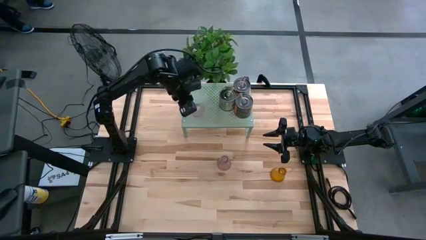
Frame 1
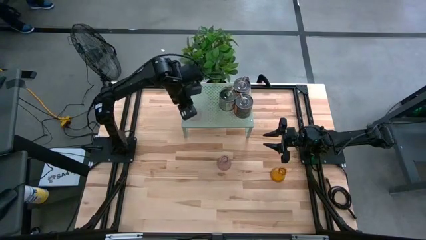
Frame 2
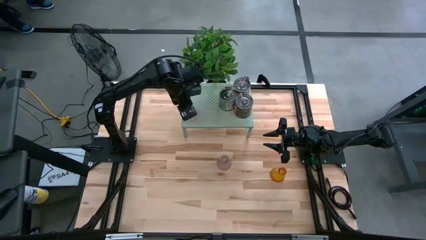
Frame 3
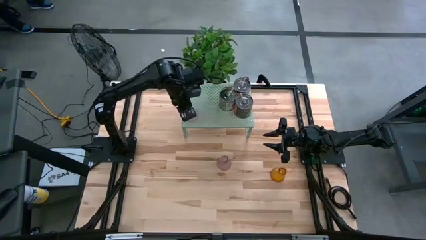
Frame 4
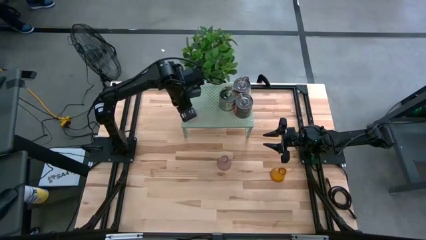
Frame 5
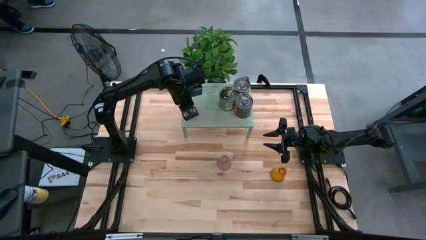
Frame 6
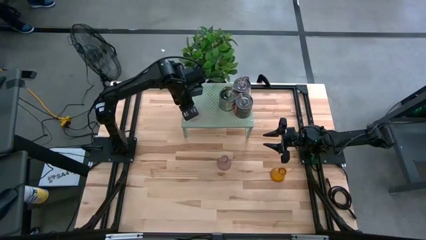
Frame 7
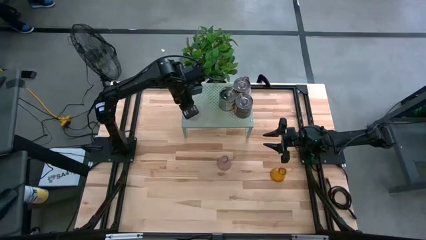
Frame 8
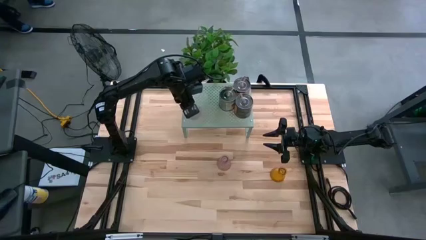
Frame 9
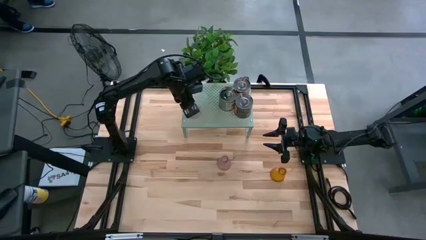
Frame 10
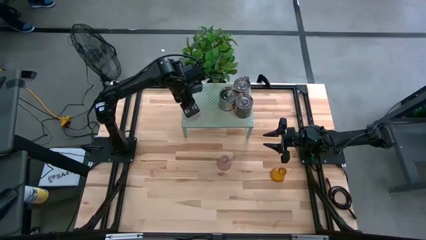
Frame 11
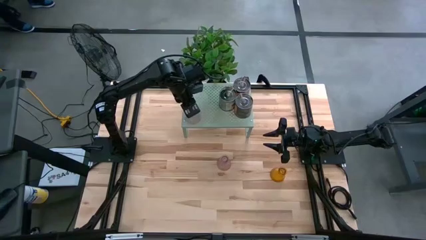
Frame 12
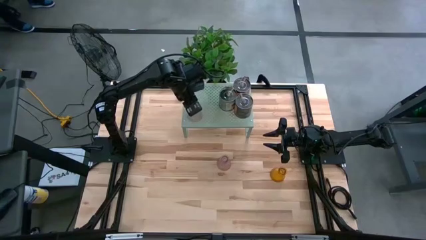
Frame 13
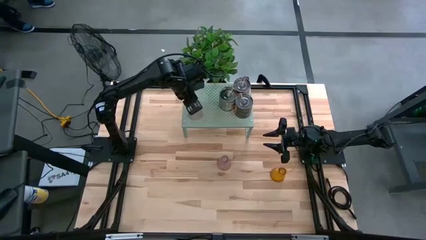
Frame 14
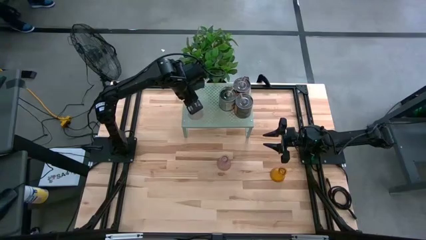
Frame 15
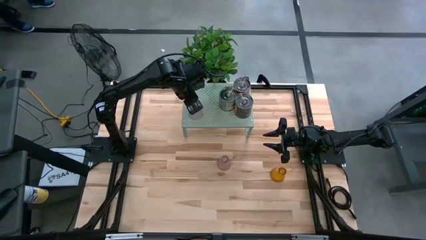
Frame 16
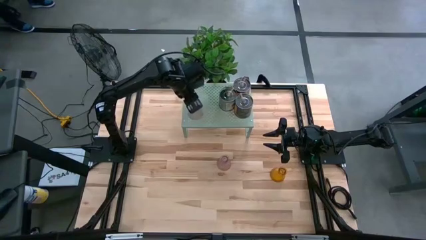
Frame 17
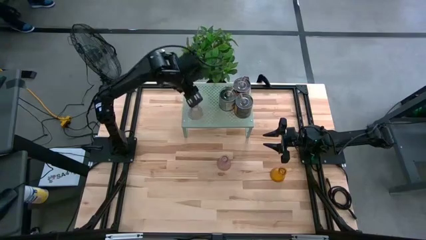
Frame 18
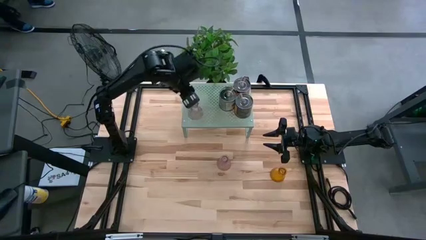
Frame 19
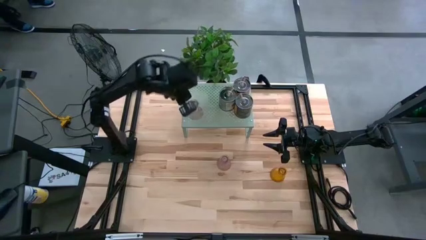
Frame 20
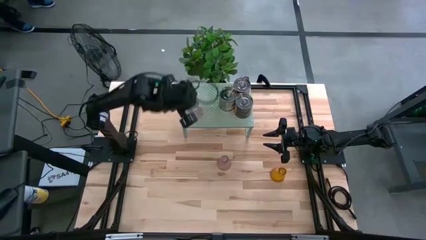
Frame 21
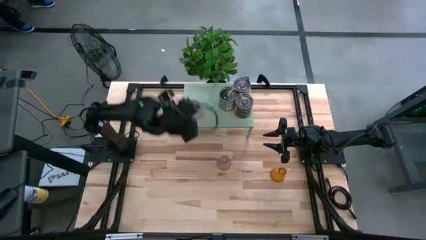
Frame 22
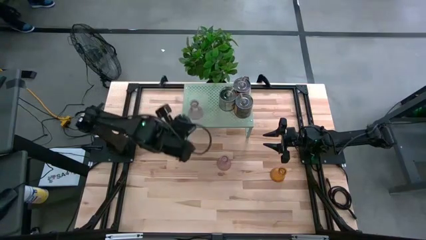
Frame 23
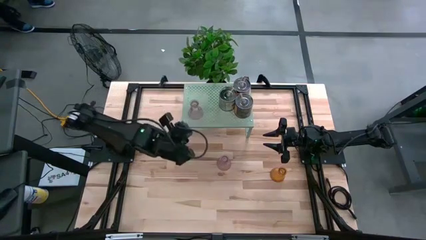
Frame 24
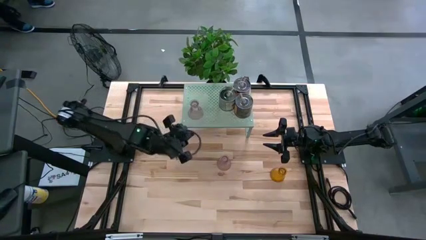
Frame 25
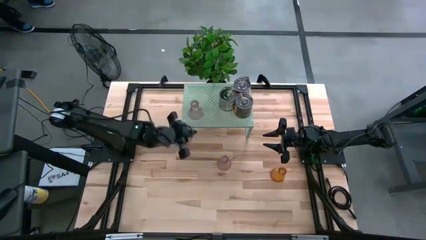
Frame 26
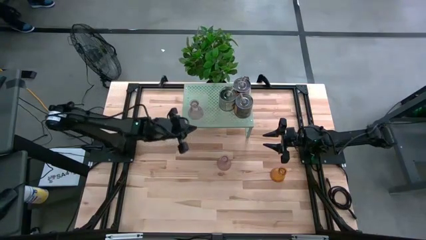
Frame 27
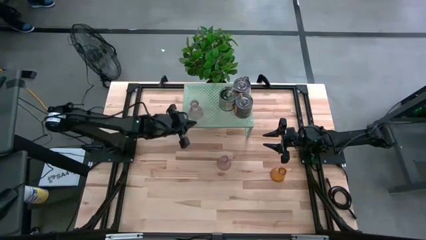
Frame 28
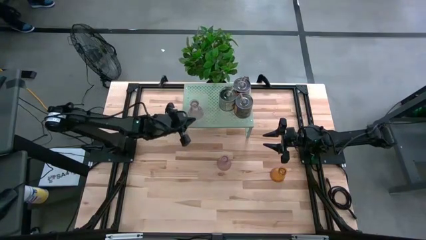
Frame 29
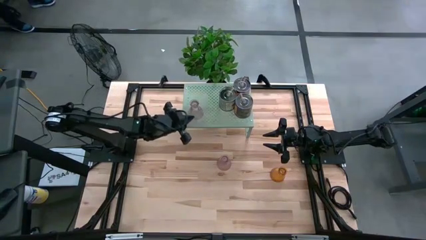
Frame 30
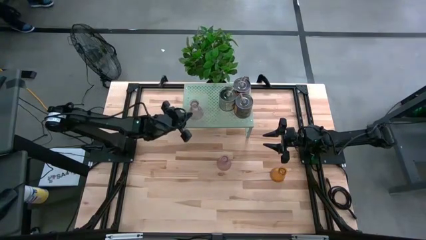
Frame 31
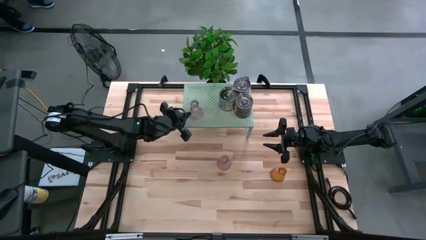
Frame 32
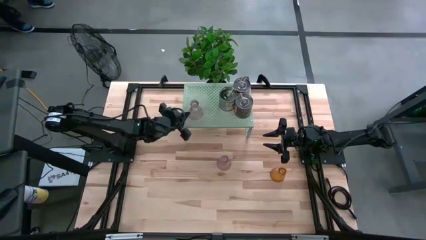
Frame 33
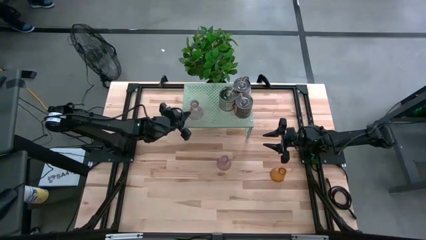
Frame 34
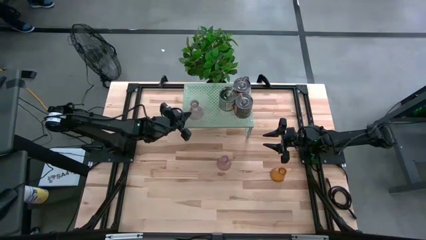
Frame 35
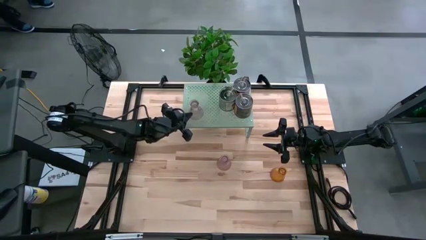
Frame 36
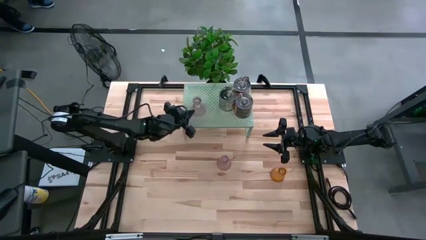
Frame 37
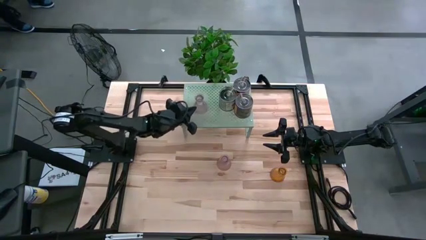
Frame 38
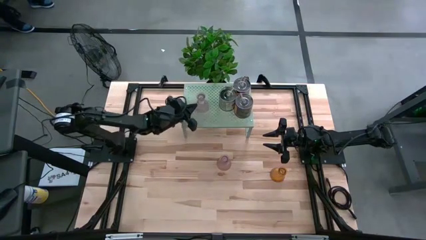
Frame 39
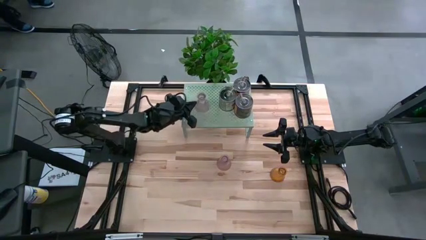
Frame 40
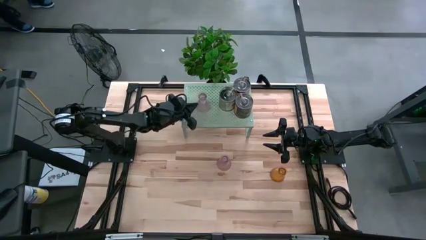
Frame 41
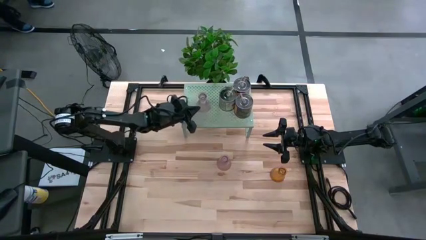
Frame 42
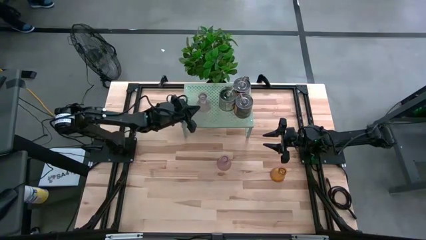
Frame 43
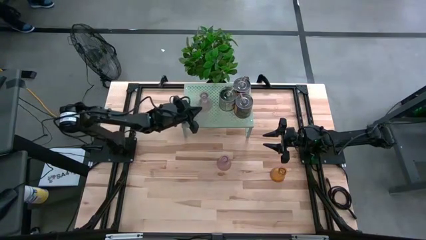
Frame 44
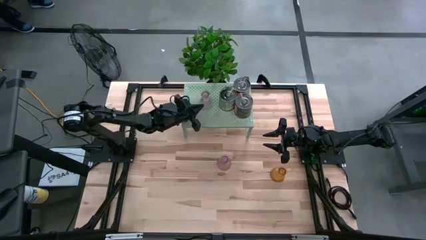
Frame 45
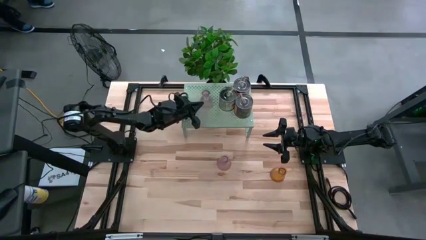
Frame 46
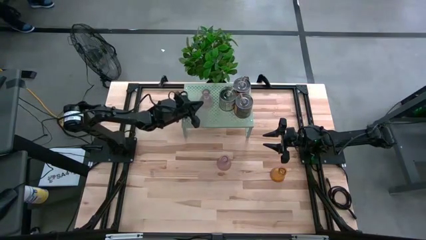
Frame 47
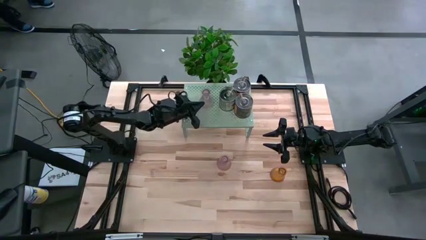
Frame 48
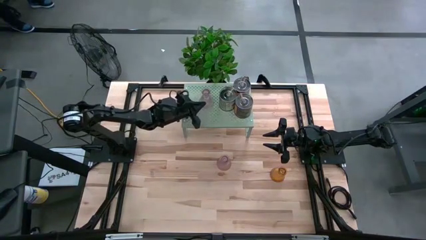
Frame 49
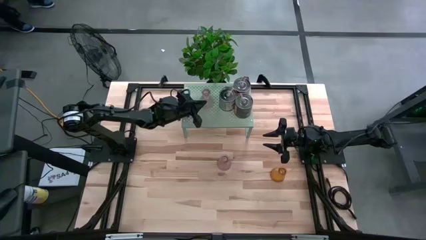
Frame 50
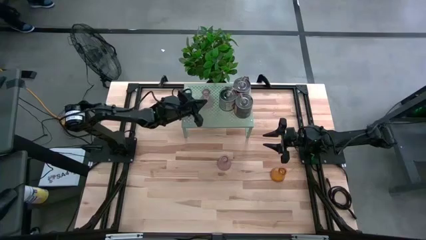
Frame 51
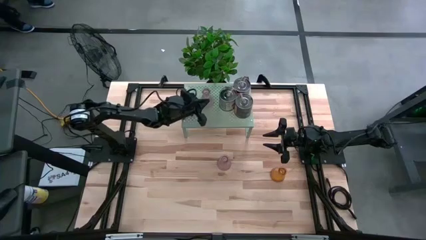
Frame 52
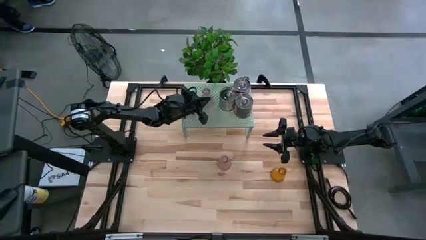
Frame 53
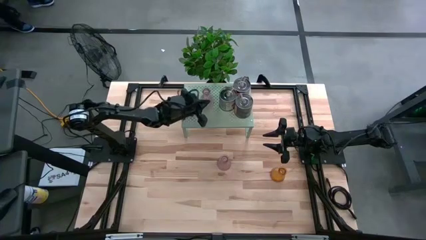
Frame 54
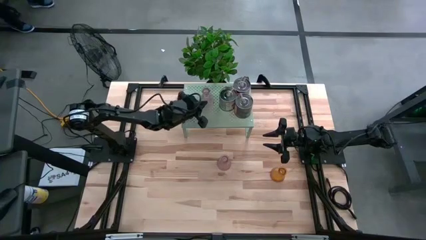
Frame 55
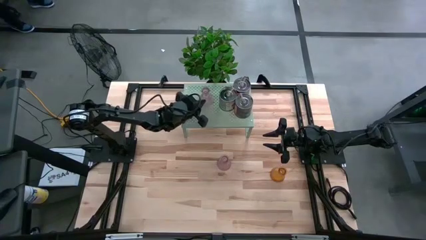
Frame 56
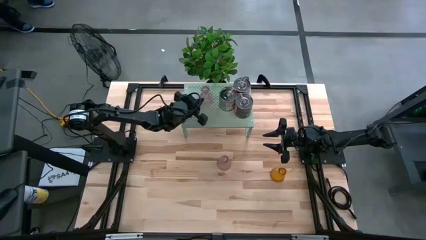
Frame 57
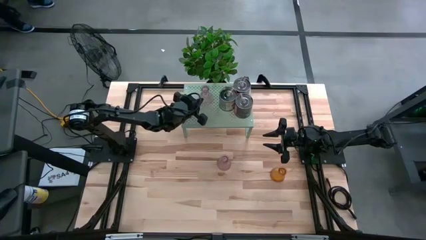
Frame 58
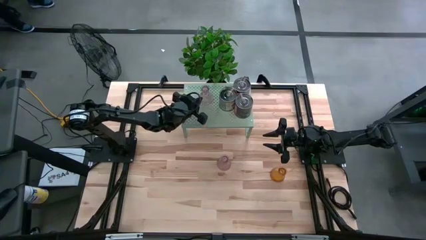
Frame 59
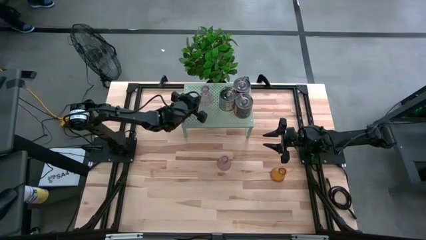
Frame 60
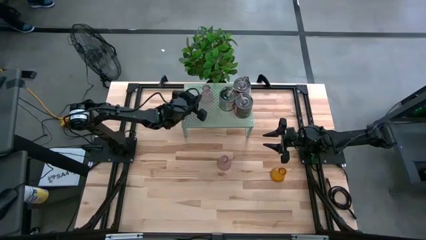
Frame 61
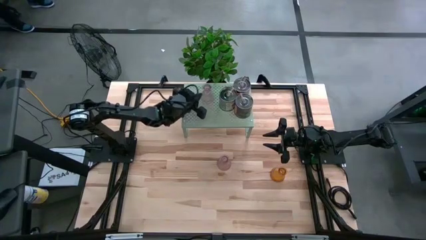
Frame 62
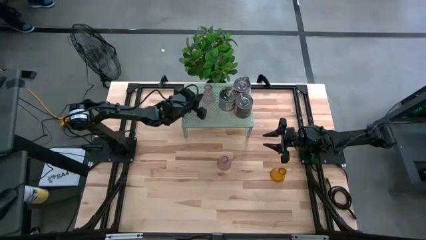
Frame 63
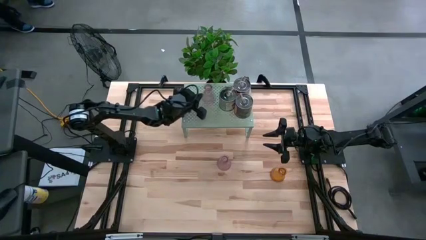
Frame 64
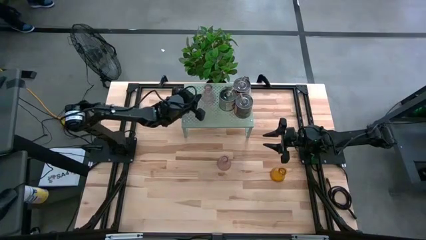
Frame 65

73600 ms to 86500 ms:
Task: Pick & Place candle stick holders
Put the left pink glass candle holder on the shelf

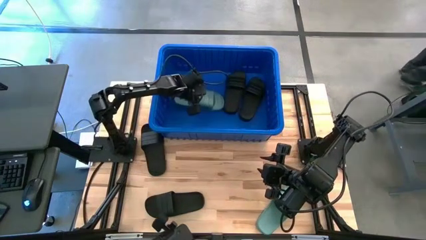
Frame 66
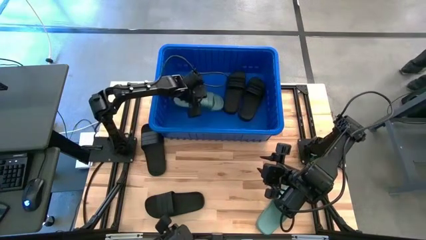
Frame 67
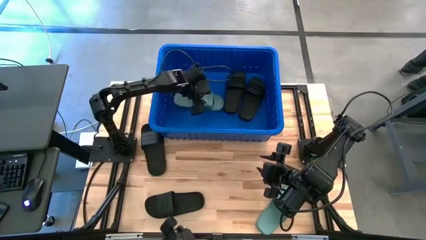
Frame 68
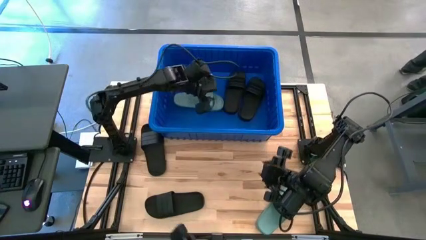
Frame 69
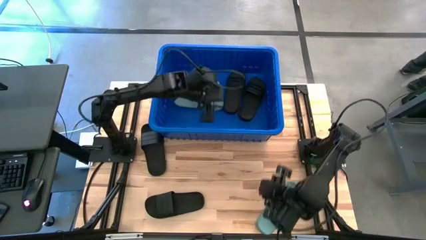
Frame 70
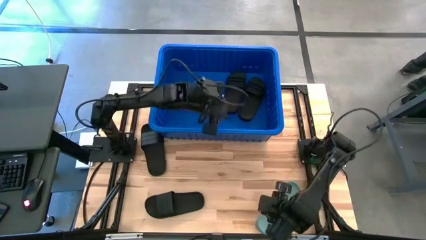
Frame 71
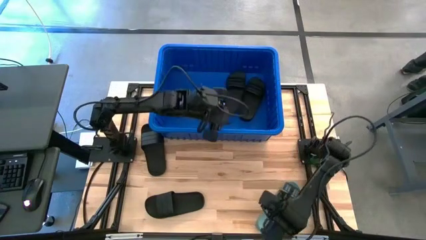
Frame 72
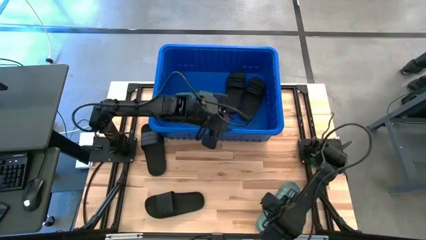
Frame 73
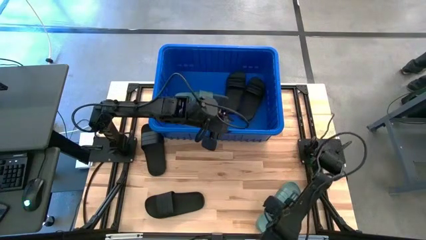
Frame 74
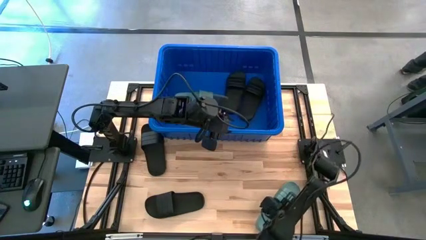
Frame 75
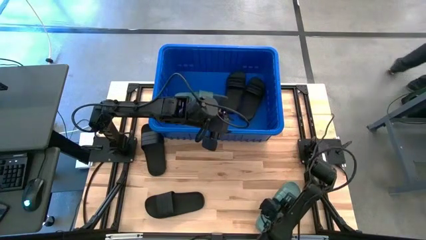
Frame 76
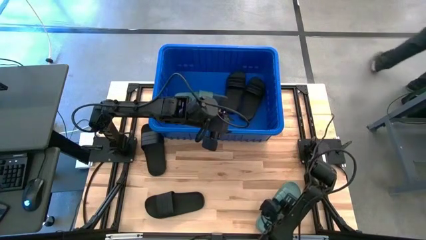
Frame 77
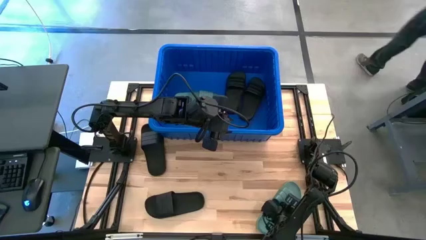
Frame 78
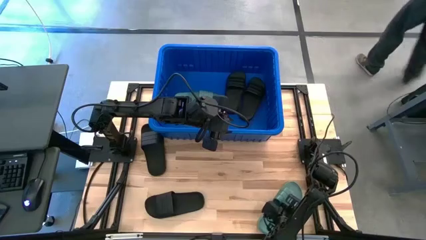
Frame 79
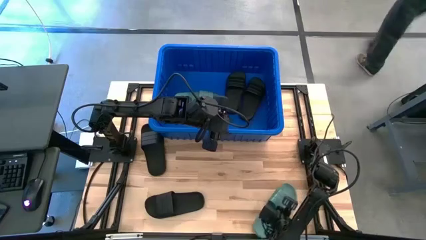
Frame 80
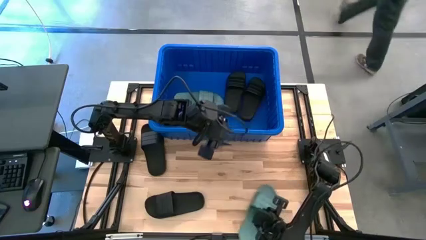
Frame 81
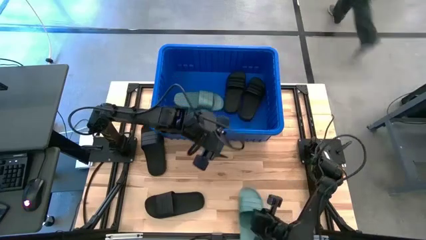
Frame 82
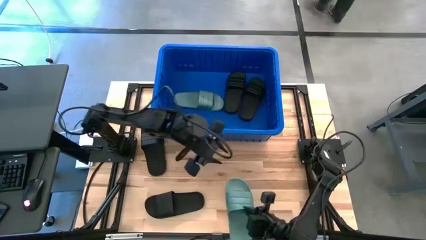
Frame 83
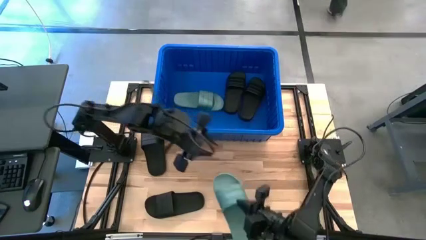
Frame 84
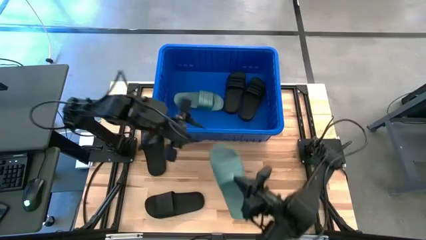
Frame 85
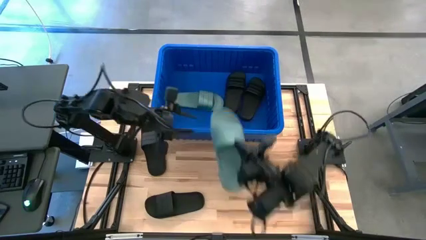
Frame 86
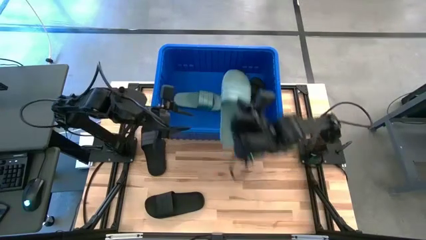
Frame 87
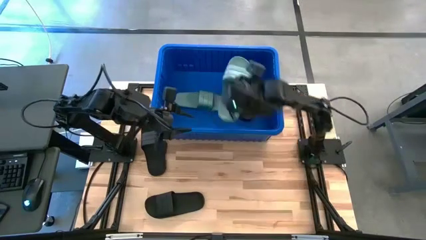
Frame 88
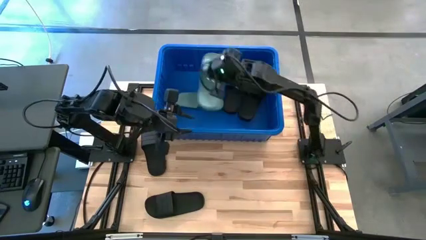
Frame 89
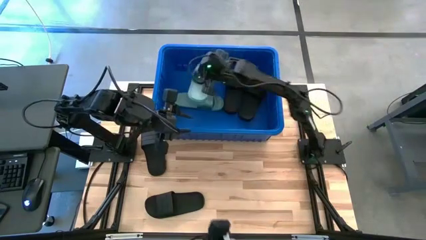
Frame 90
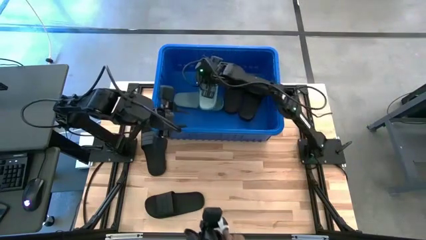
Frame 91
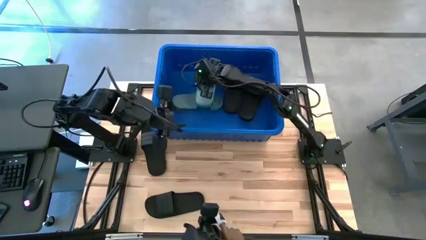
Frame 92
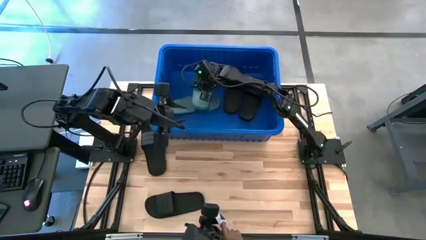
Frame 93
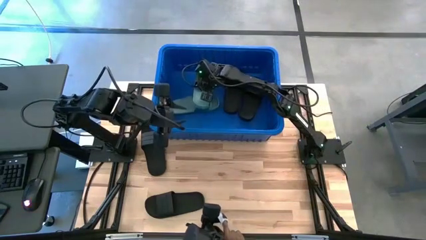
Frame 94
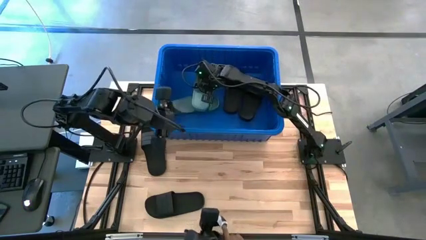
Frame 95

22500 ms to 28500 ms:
Task: Pick and place slides into bin
Put the green slipper into the blue bin
